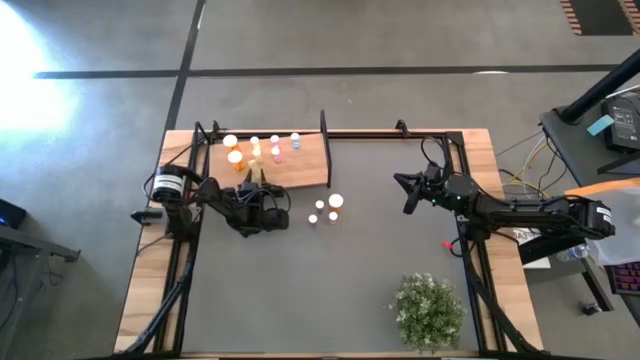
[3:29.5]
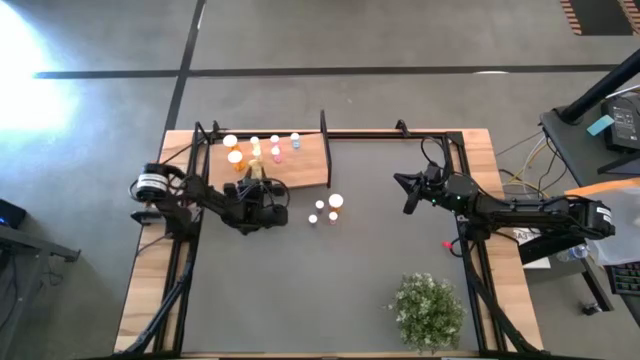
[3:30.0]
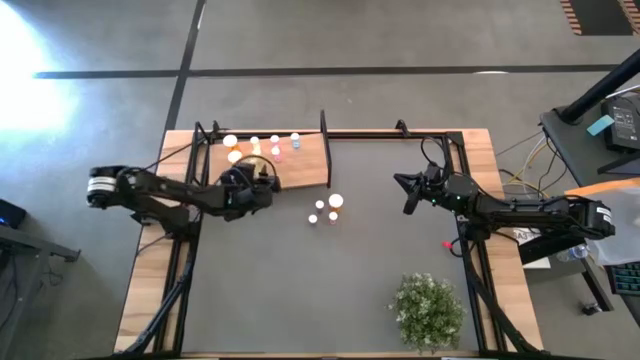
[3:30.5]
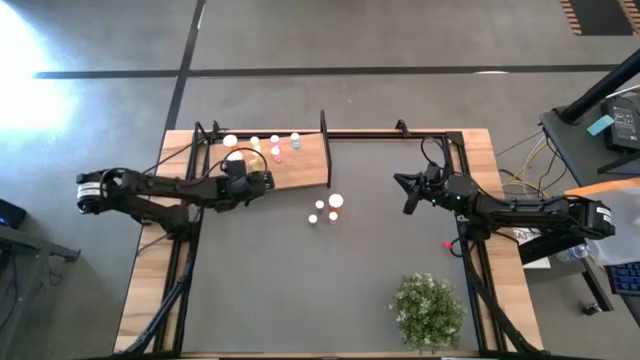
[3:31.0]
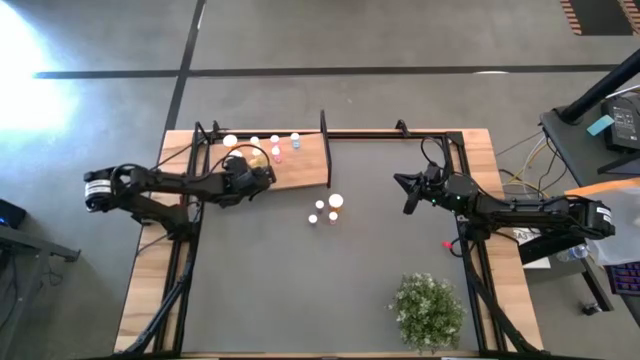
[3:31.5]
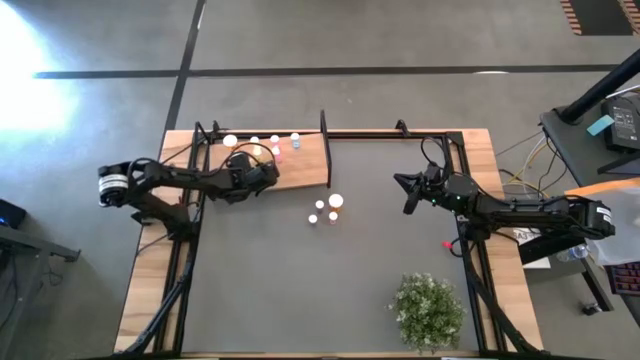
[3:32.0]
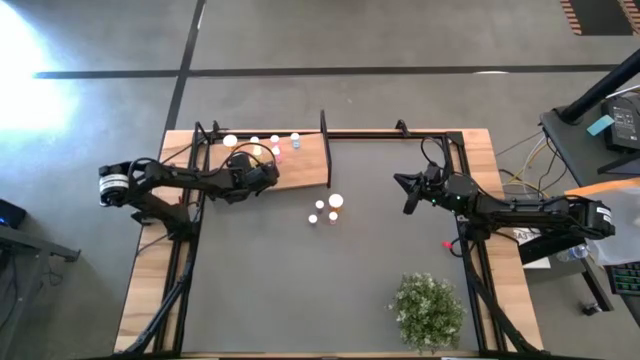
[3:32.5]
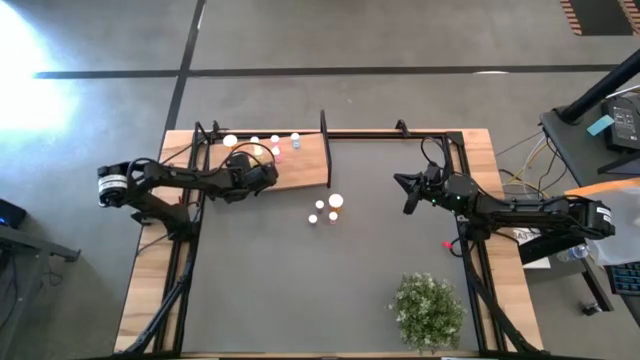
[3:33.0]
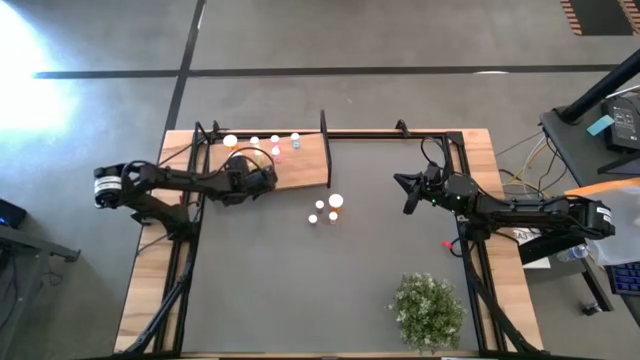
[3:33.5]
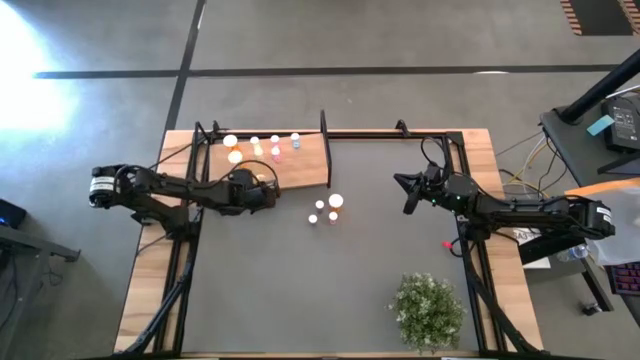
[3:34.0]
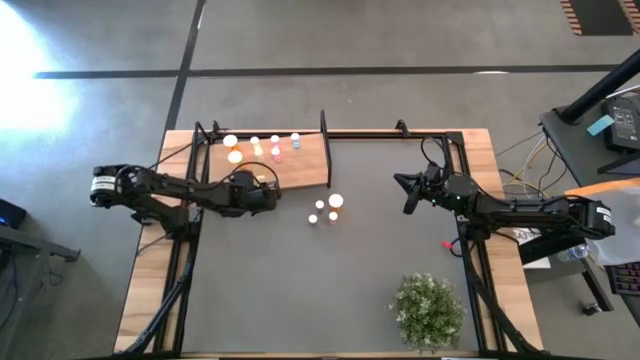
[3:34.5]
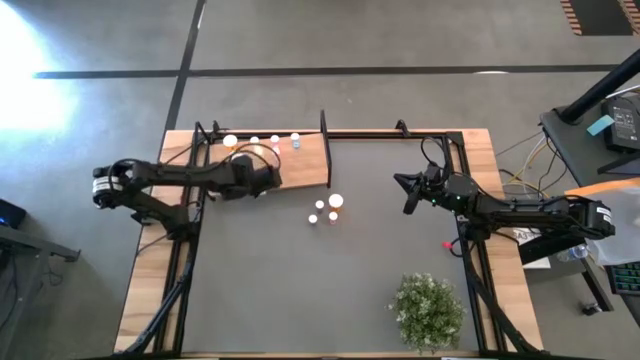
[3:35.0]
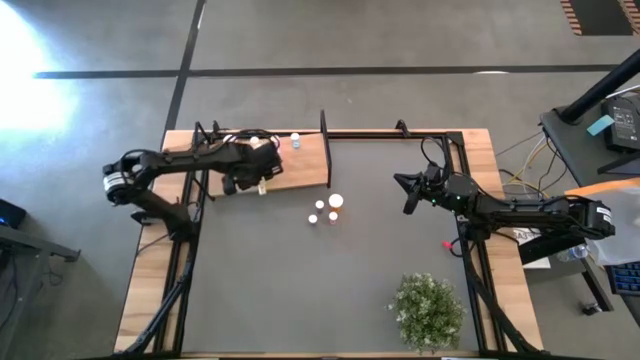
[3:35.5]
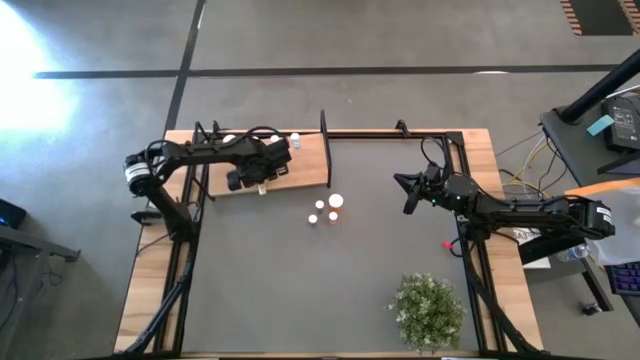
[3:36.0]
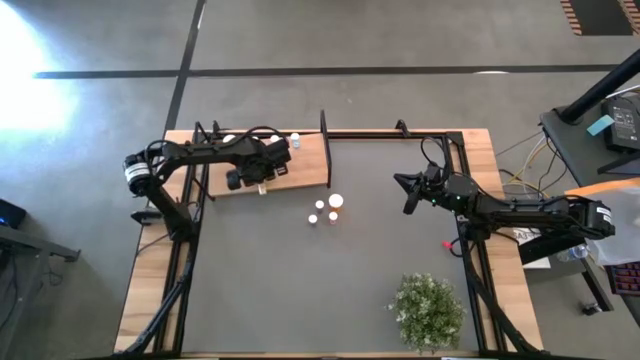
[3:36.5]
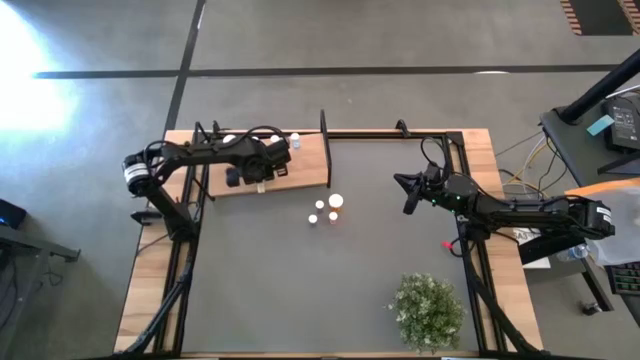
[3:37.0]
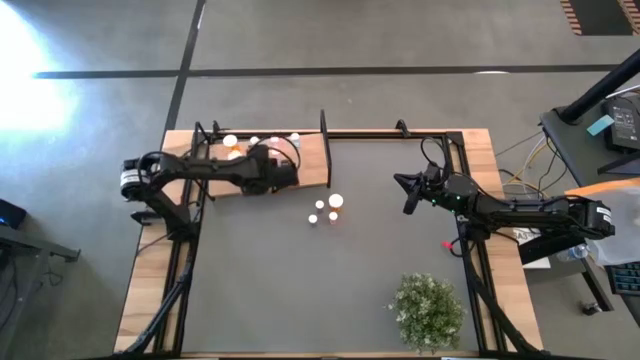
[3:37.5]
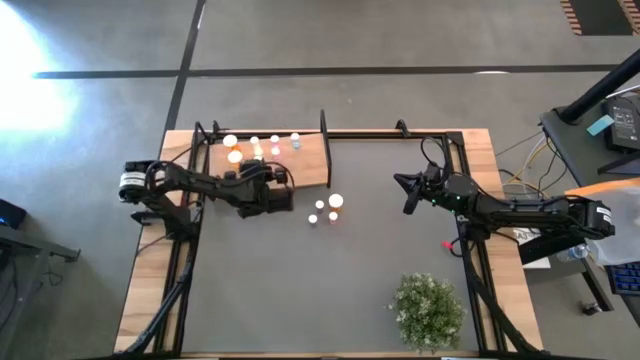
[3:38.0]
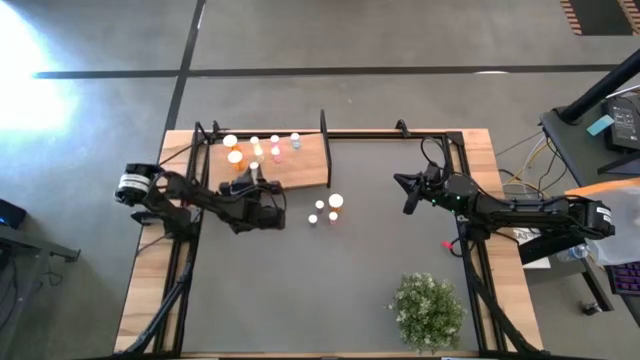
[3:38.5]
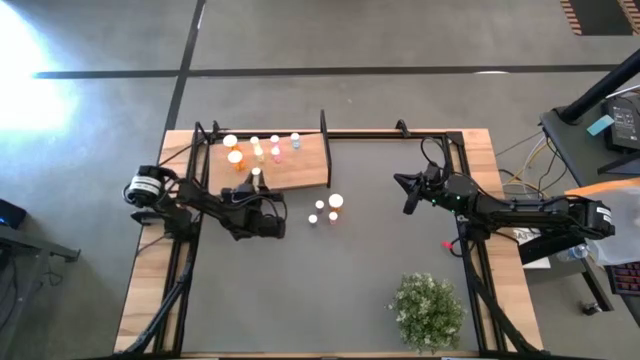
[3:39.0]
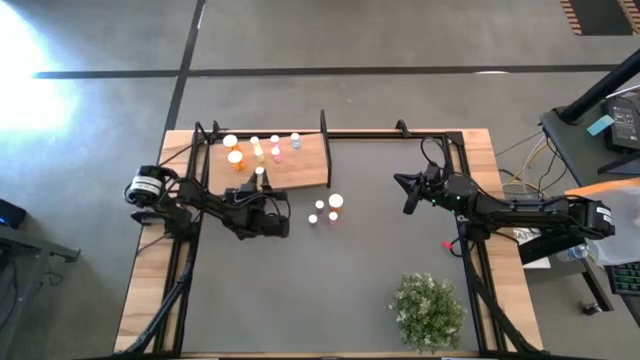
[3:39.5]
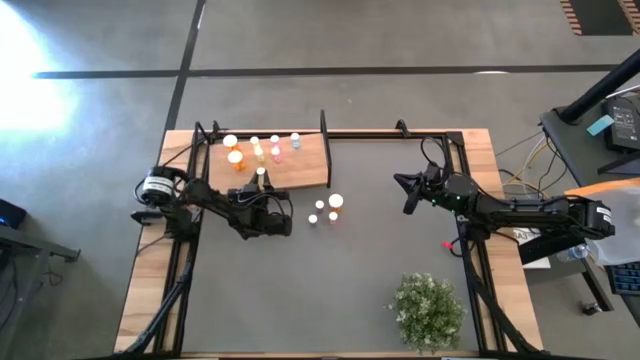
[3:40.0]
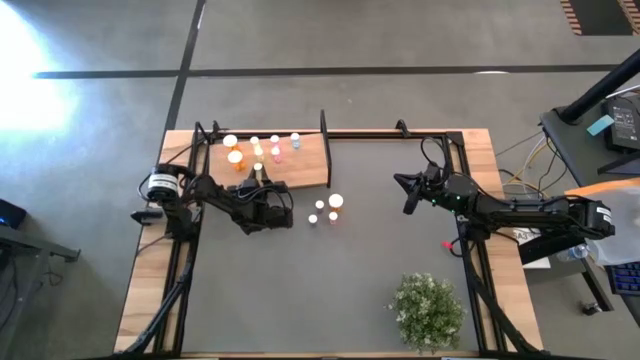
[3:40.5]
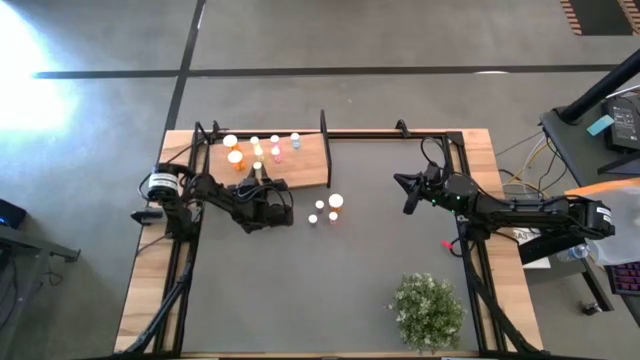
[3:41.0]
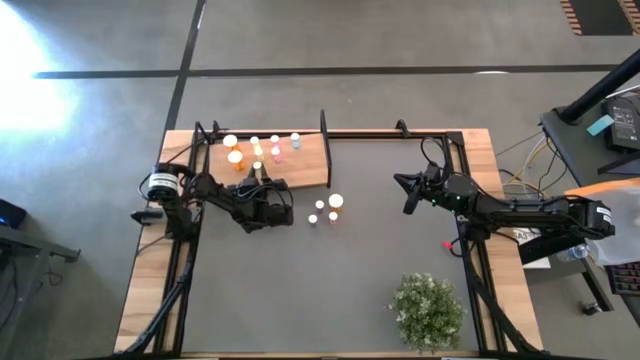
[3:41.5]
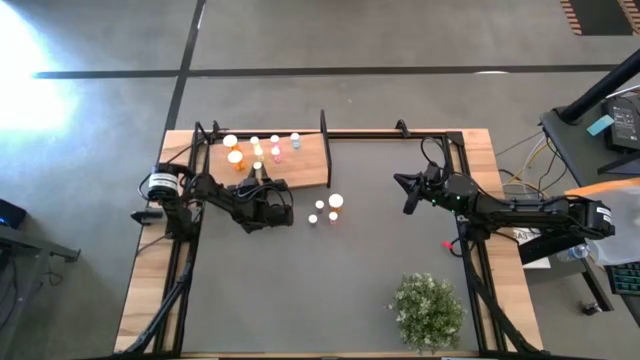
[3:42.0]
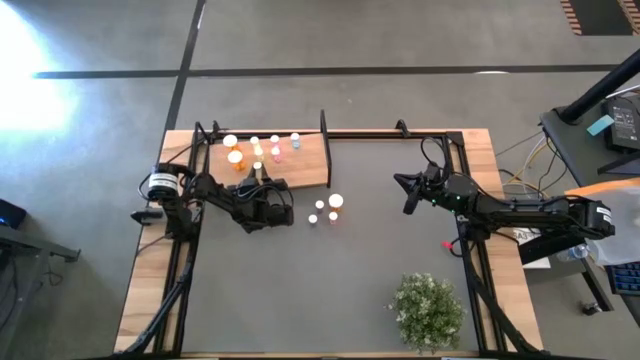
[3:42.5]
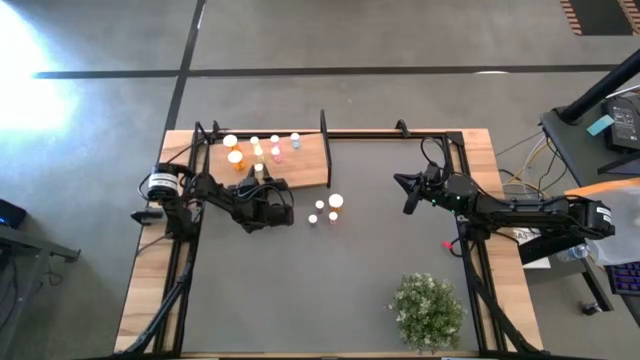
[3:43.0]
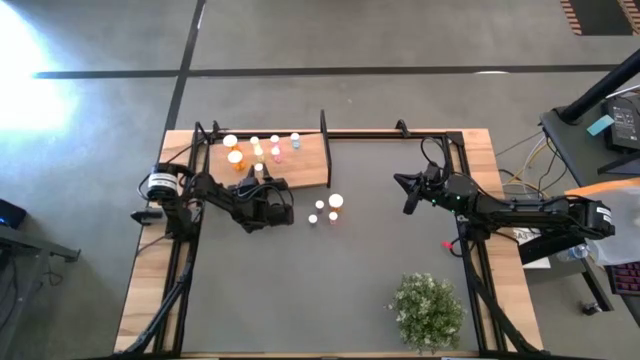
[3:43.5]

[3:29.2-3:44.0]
Task: Pick and place medicine bottles onto shelf by color
Put the yellow pill bottle on the shelf aligned with the other yellow pill bottle

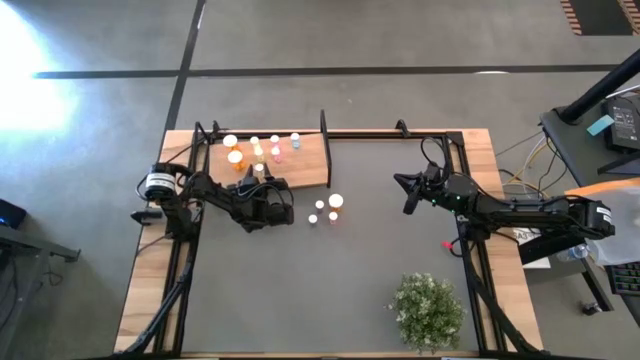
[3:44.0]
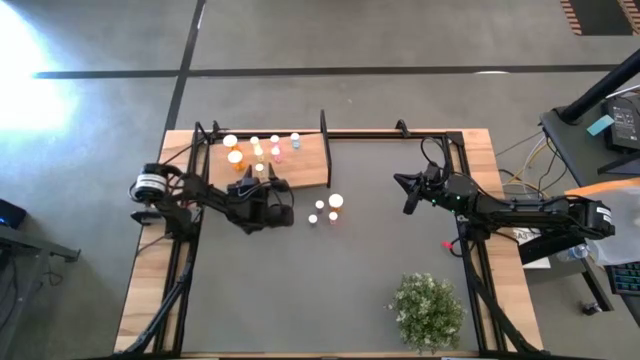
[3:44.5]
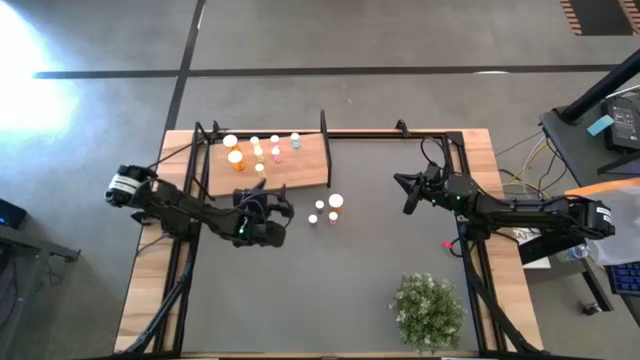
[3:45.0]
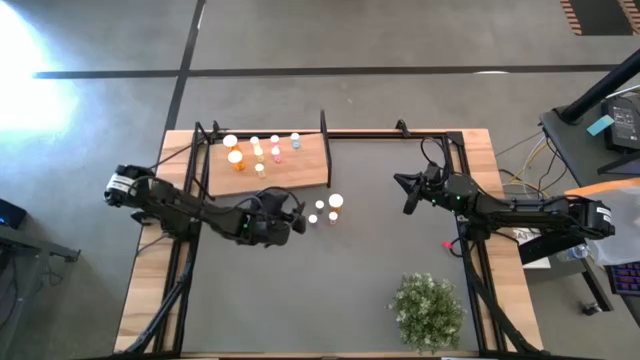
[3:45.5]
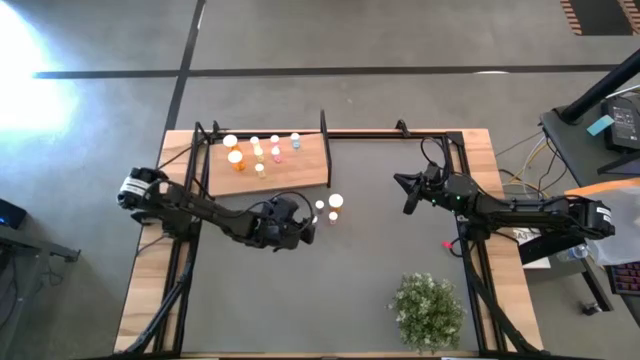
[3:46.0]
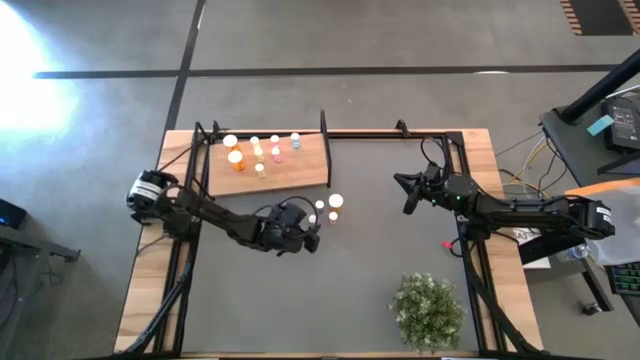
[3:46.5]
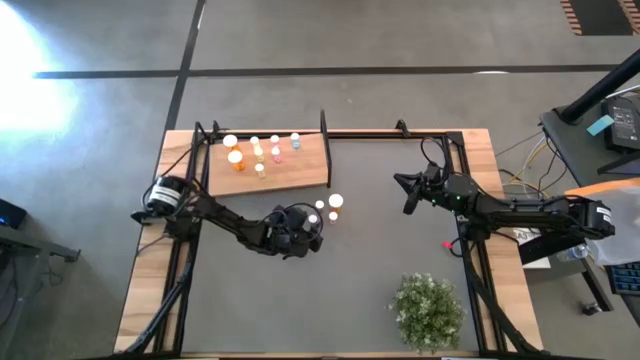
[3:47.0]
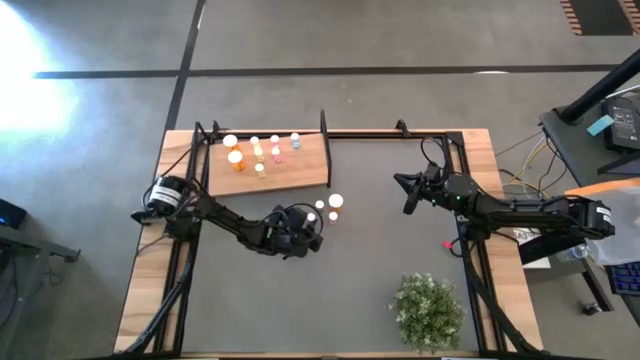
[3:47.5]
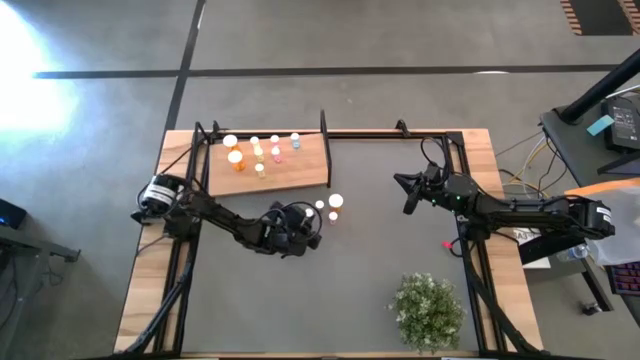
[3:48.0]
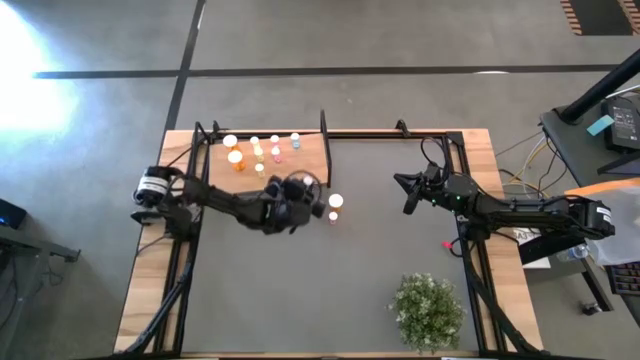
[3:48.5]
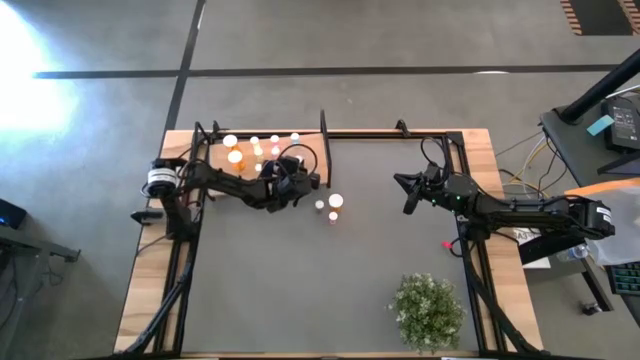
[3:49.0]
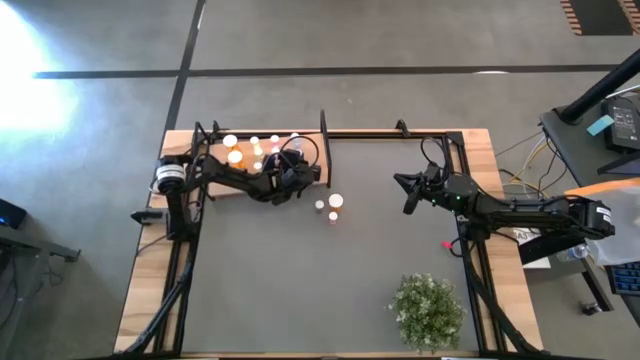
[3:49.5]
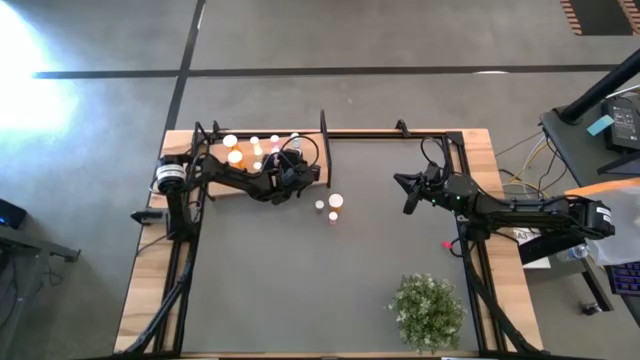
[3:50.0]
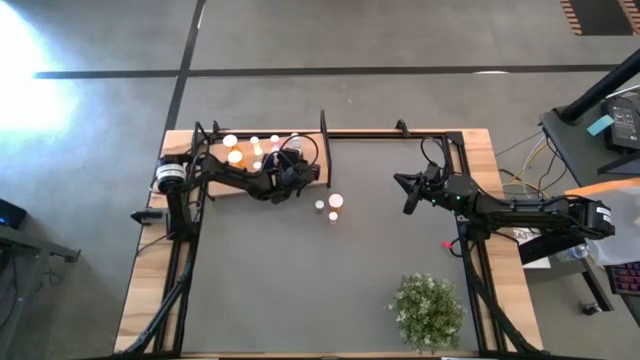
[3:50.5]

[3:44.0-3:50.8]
Put the bottom blue pill bottle on the shelf aligned with the other blue pill bottle

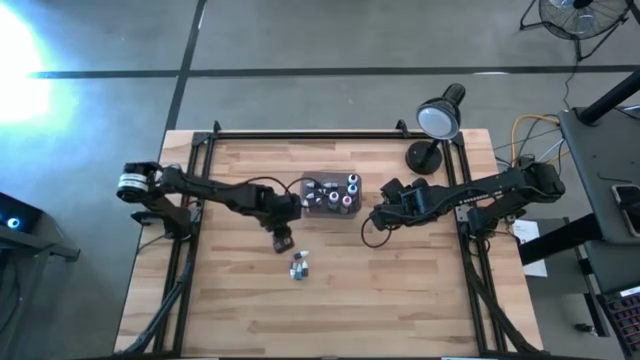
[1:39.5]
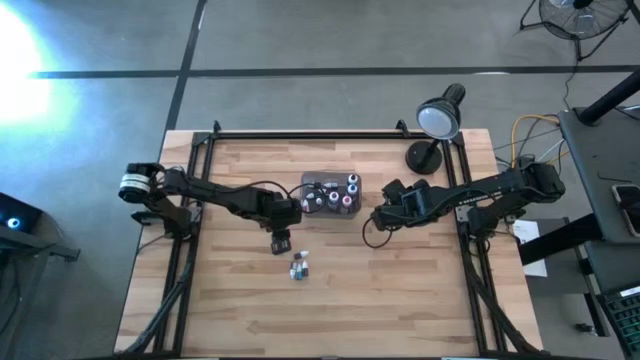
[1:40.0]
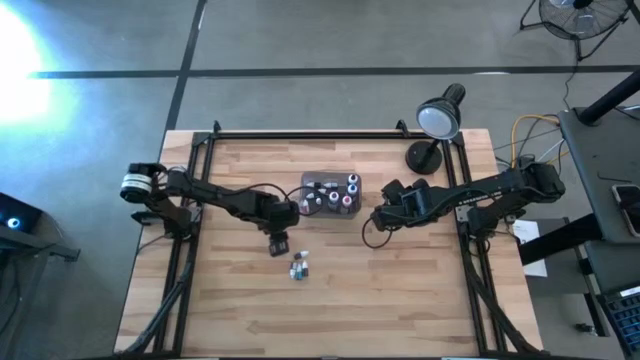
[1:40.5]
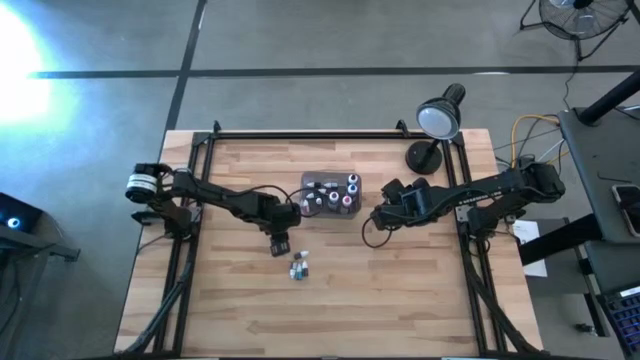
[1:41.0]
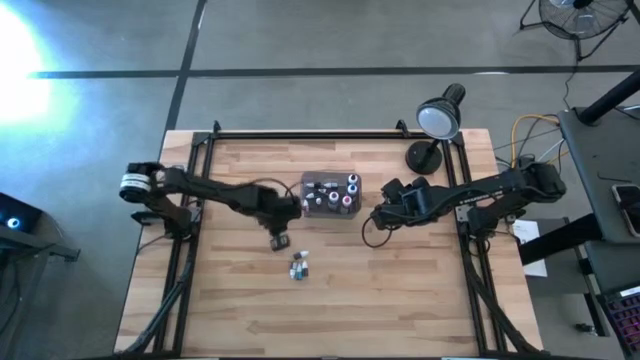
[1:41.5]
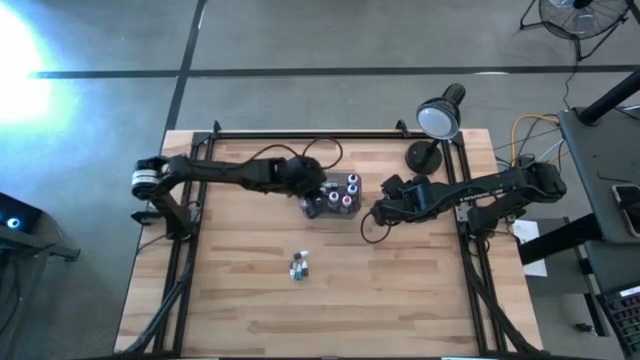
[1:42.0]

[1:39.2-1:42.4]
Task: Pick & Place food coloring
Put the small black food coloring bottle into the bin
